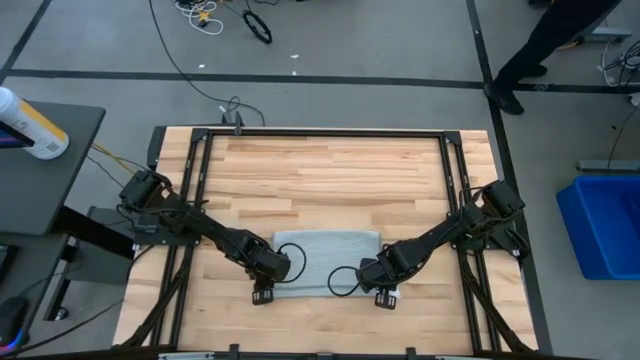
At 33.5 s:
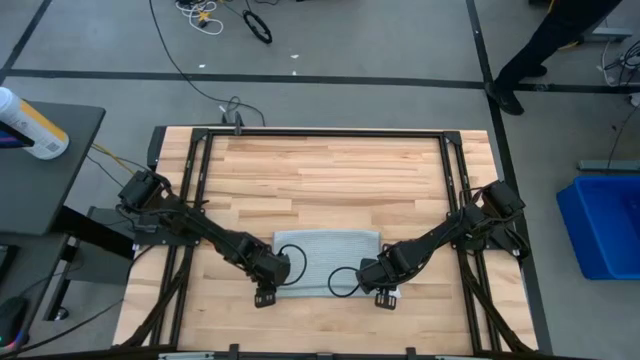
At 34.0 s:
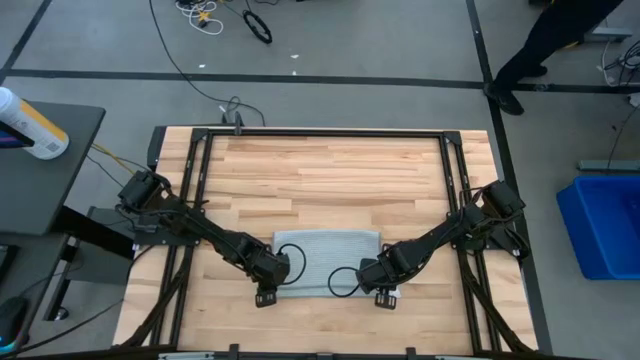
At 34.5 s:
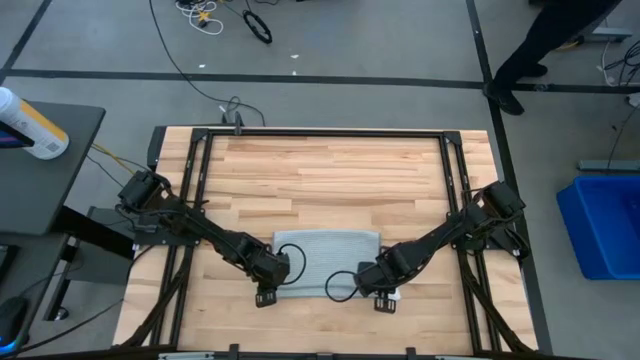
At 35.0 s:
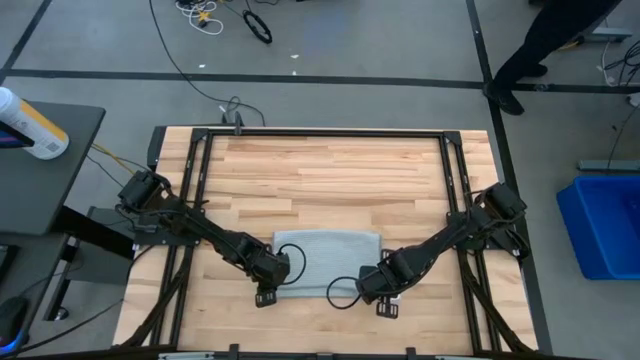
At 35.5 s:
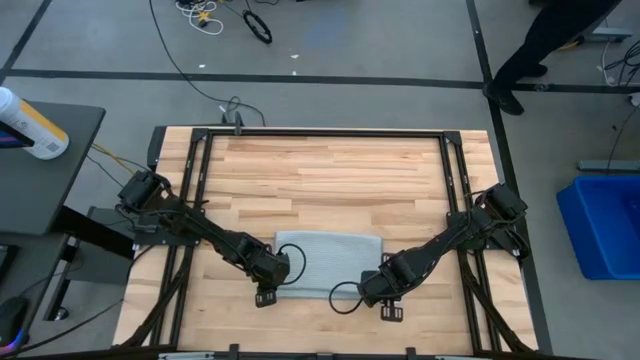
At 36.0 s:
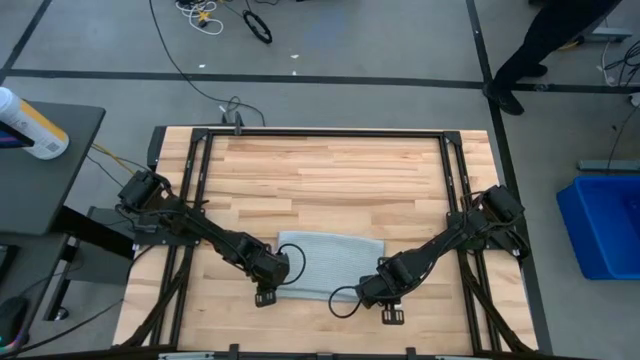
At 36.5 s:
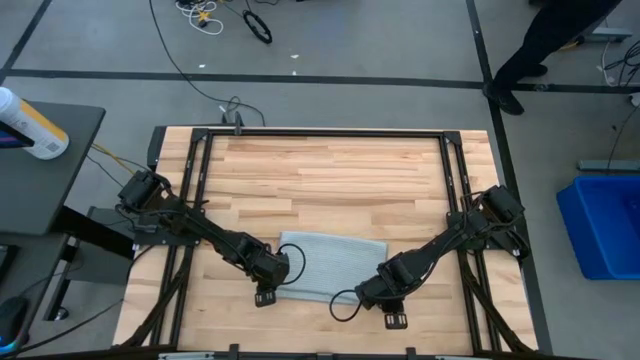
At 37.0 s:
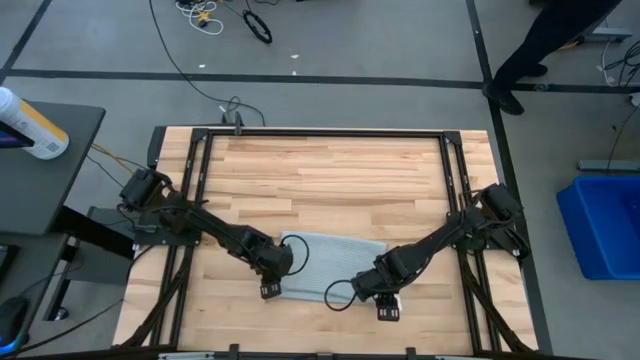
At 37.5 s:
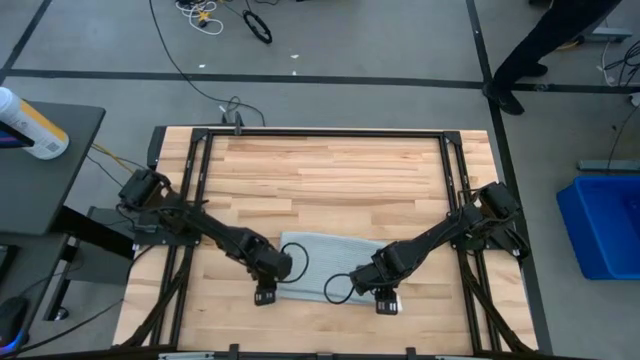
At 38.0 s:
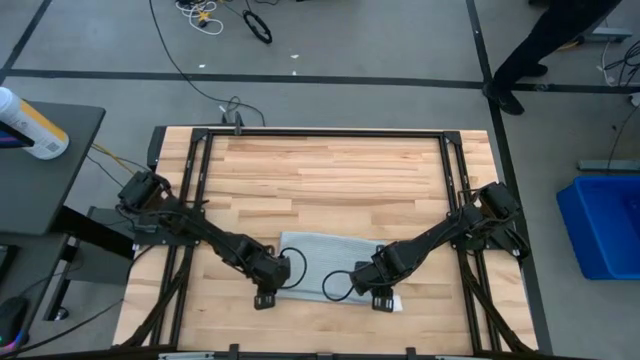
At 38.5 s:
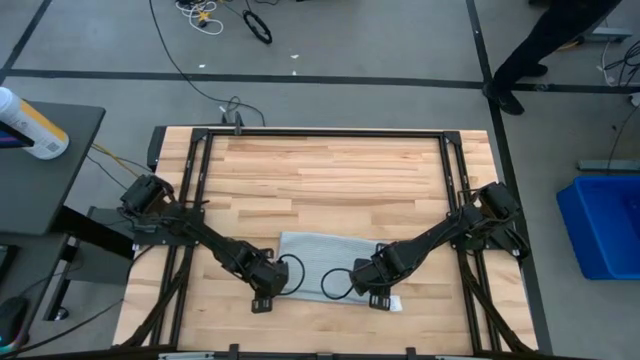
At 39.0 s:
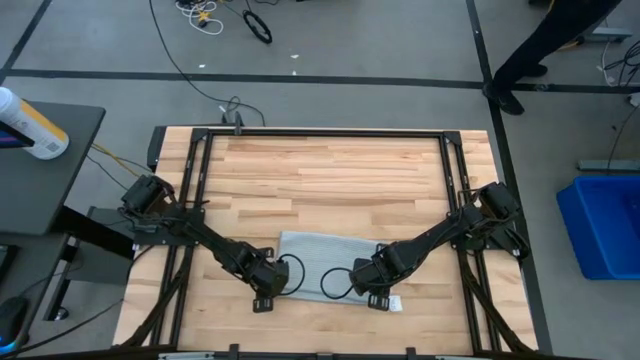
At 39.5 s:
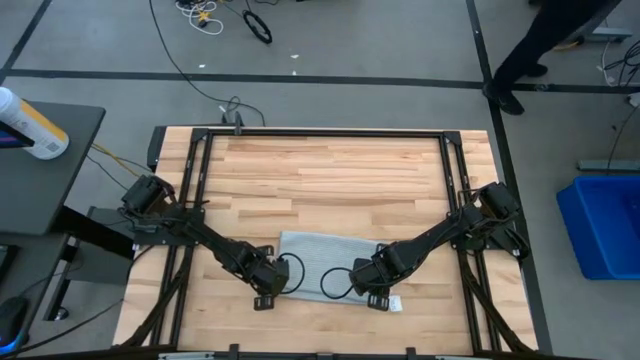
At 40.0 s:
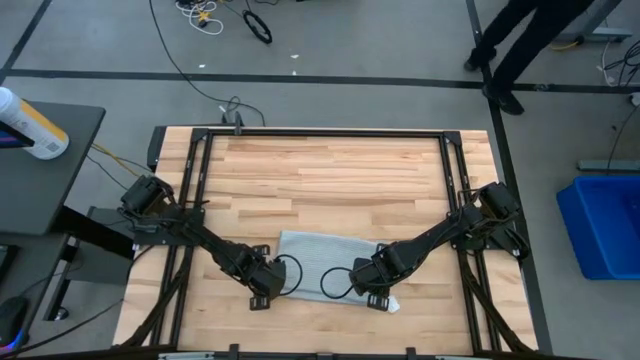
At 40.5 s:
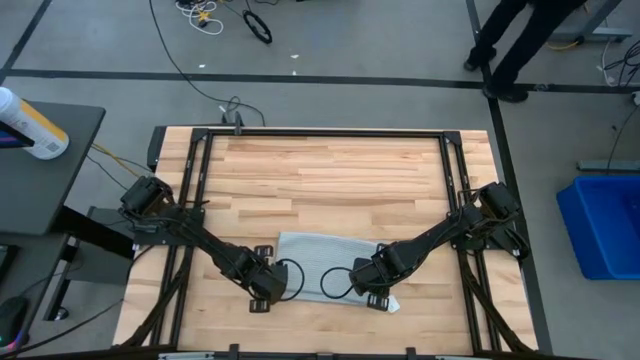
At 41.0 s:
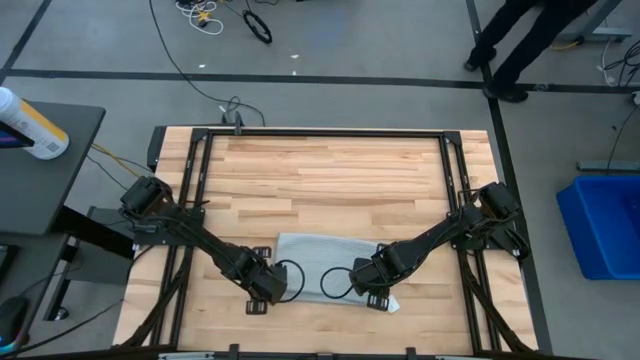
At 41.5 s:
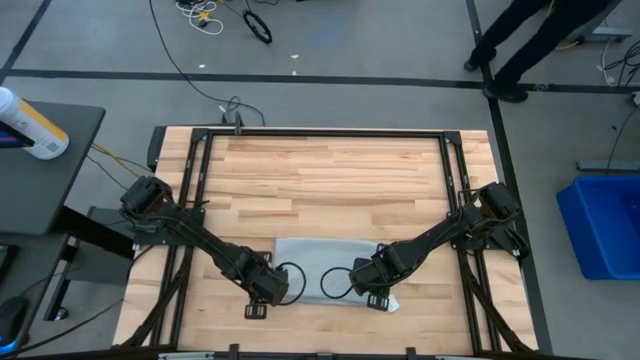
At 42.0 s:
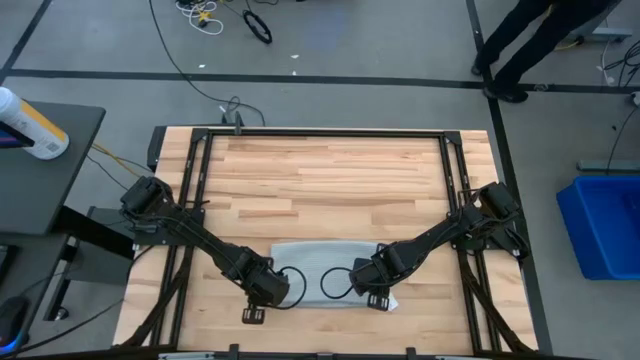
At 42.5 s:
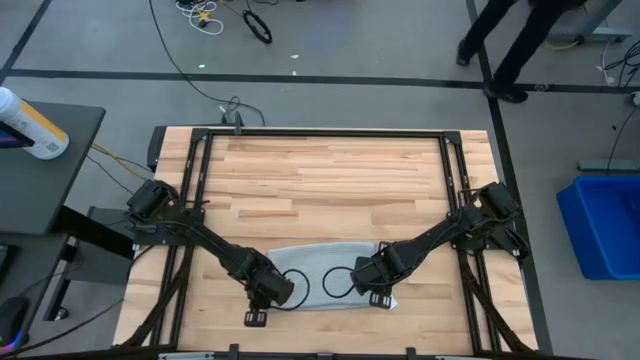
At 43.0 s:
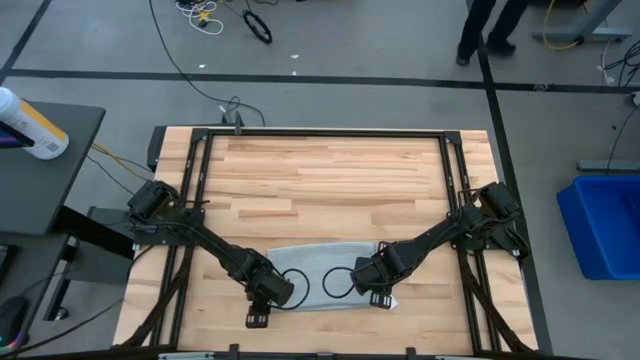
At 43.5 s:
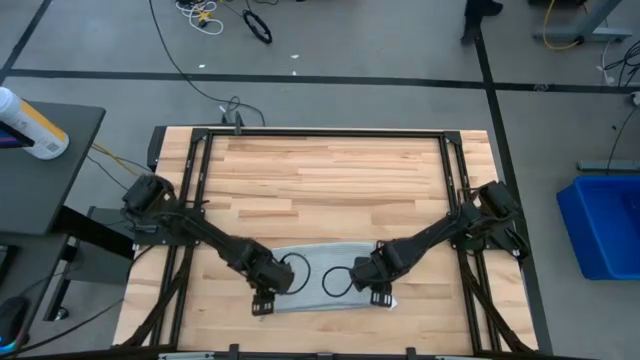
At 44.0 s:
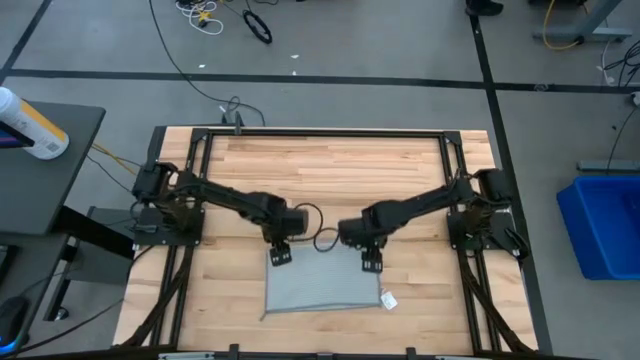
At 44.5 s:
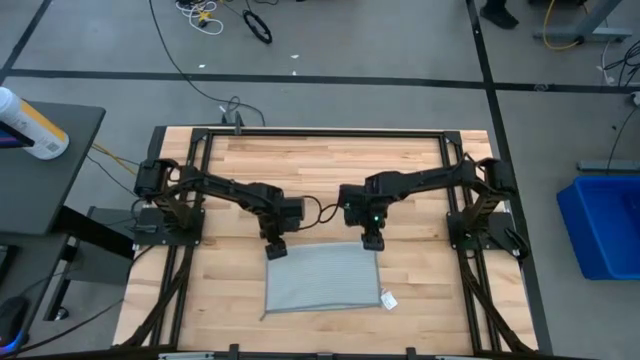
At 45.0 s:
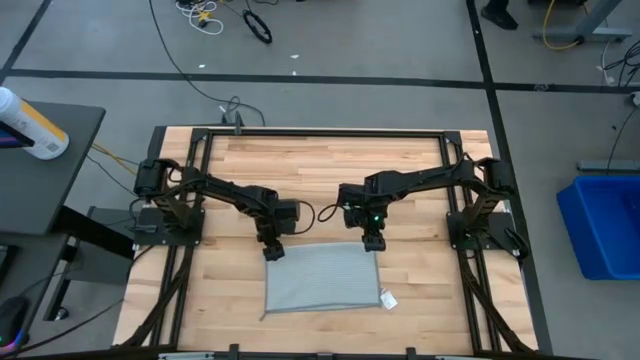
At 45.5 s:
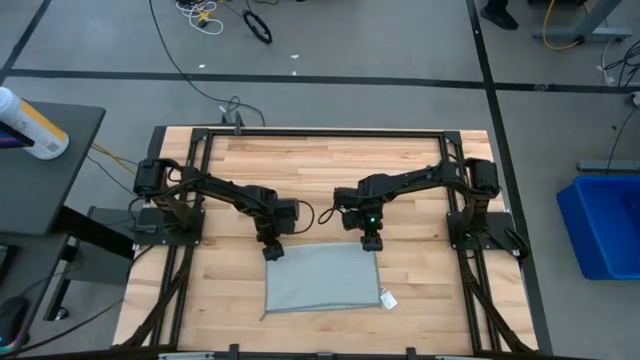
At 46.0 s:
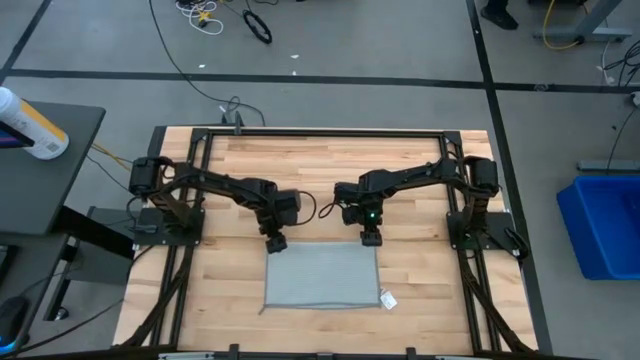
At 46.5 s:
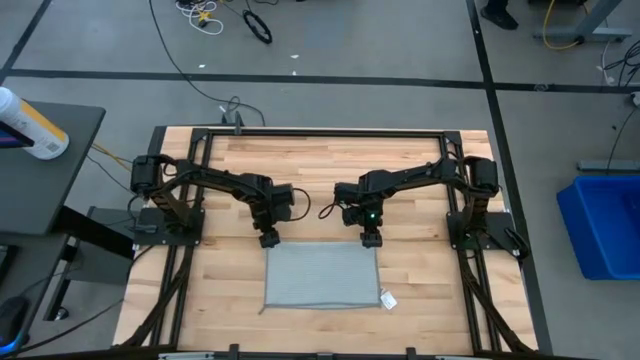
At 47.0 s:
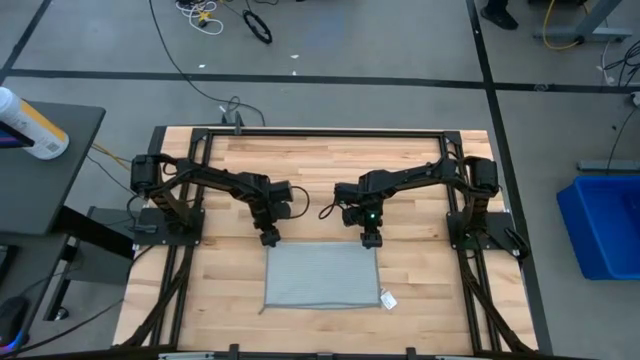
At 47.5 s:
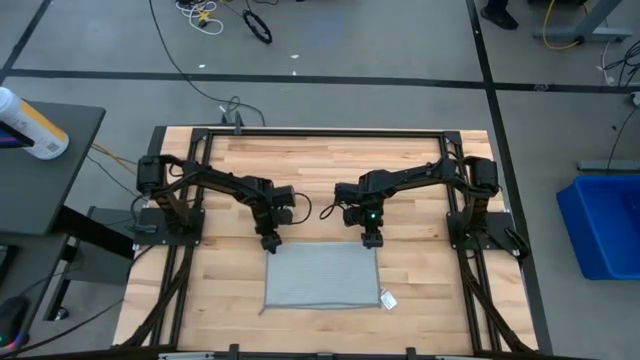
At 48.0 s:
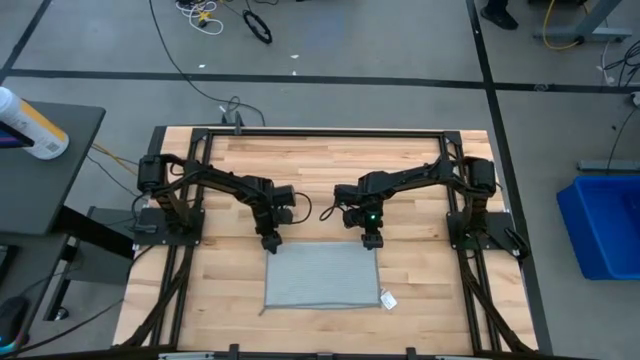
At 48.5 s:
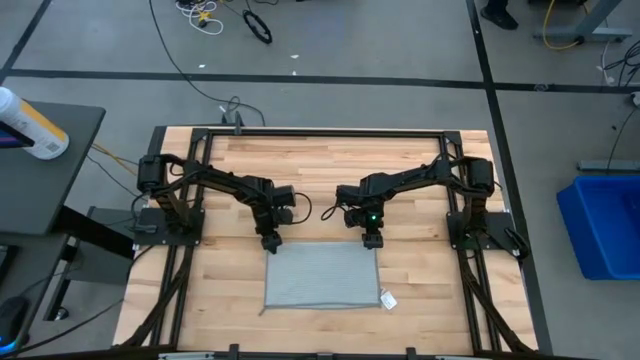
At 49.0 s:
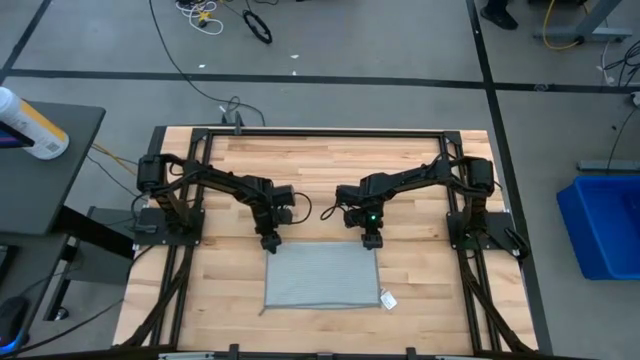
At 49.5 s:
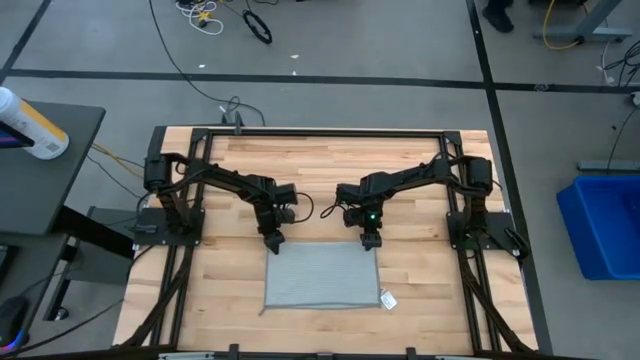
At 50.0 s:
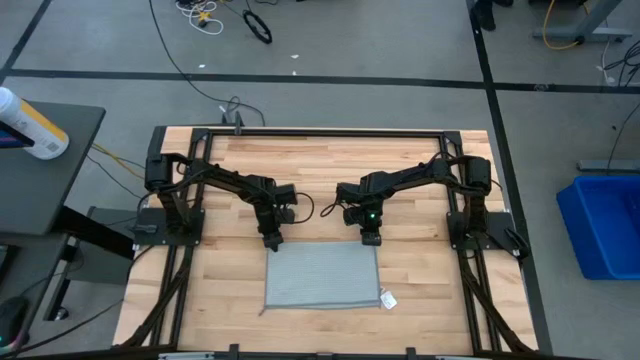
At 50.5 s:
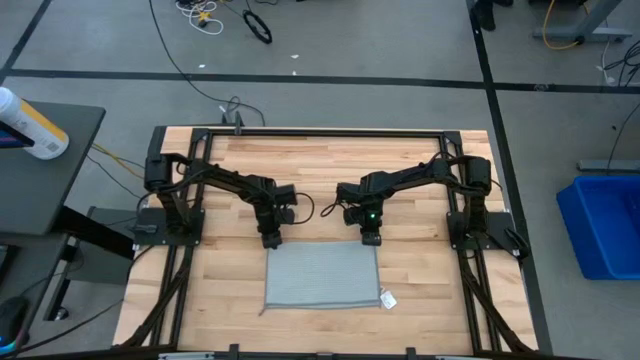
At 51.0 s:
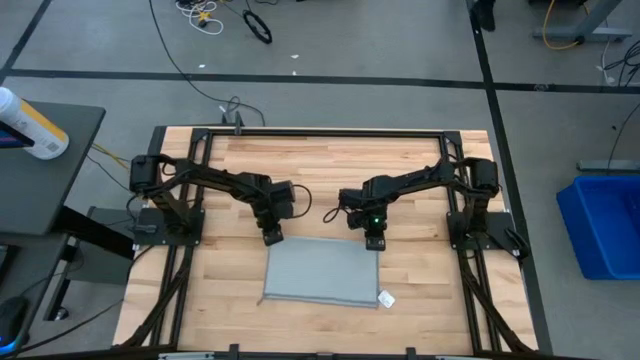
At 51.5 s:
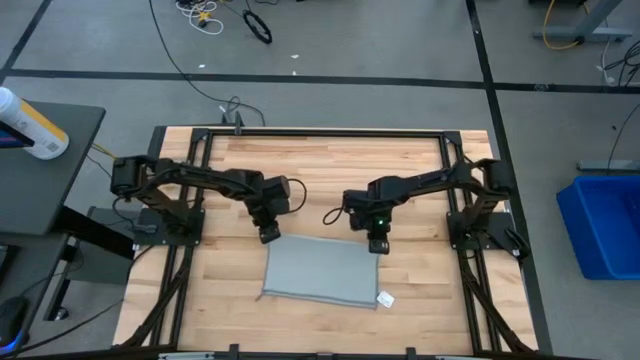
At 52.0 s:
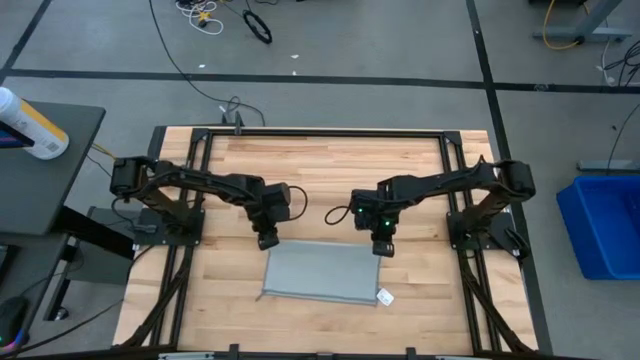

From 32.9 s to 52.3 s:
Task: Fold microfiber towels
Fold the gray microfiber towel
